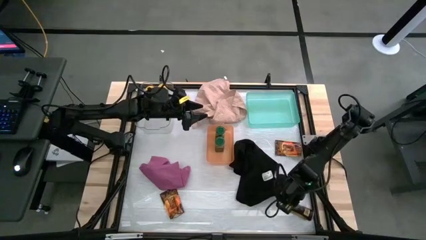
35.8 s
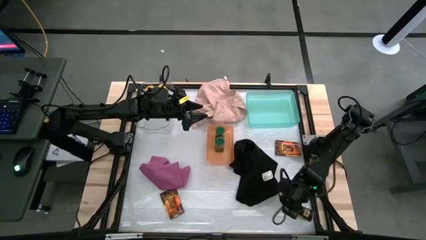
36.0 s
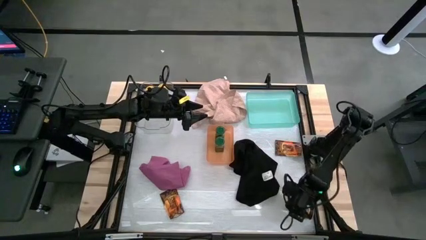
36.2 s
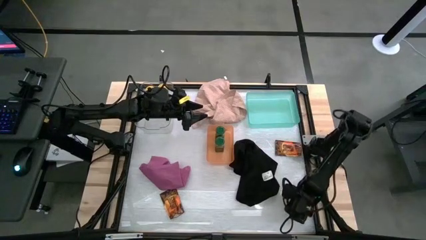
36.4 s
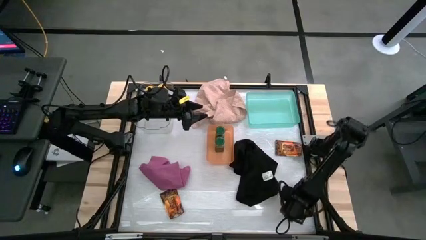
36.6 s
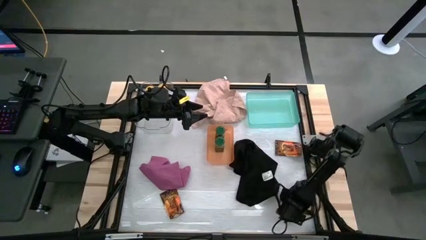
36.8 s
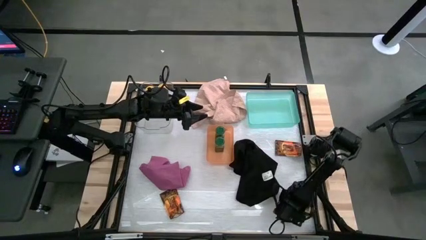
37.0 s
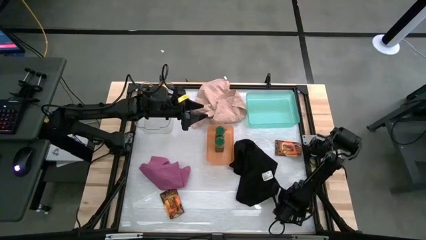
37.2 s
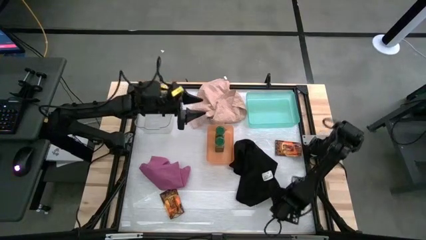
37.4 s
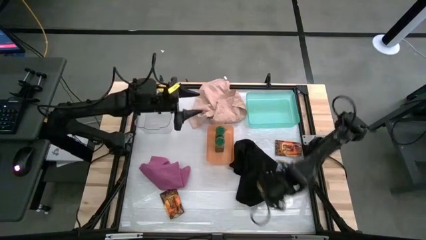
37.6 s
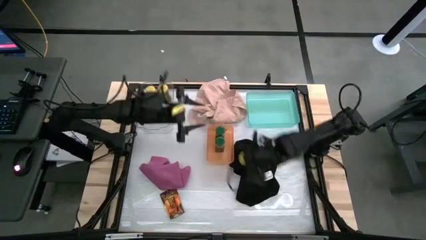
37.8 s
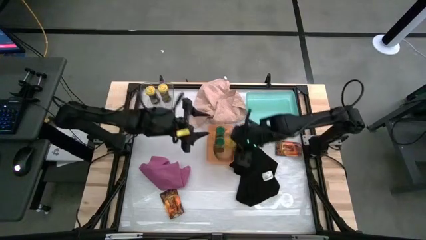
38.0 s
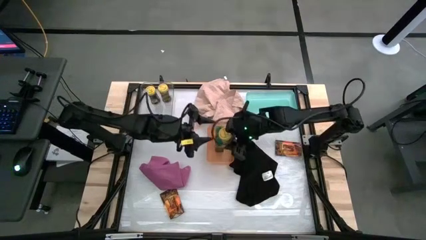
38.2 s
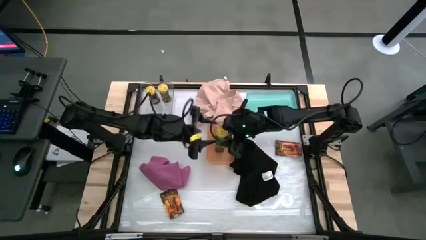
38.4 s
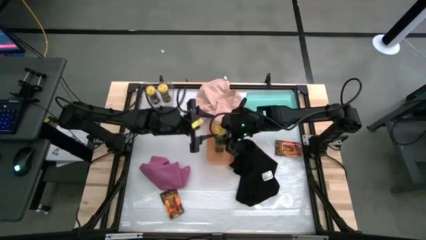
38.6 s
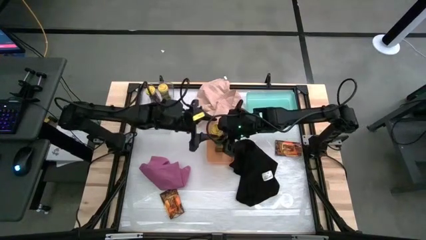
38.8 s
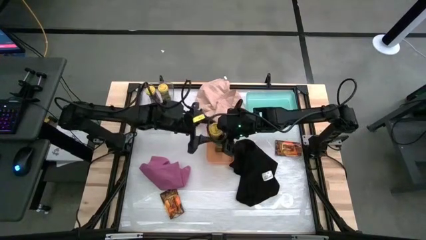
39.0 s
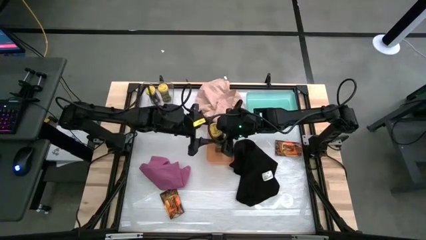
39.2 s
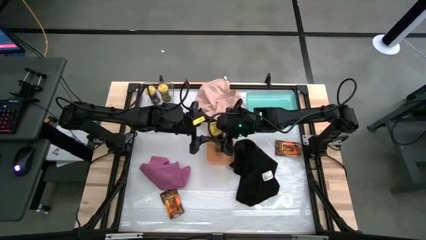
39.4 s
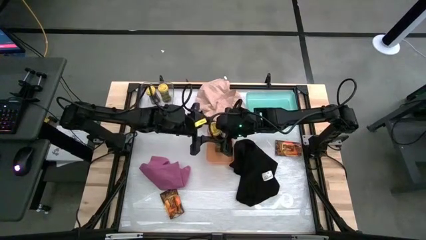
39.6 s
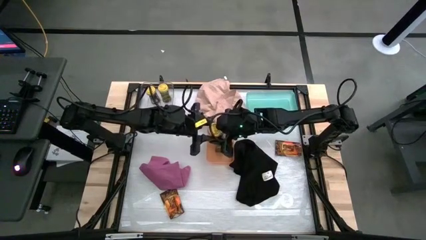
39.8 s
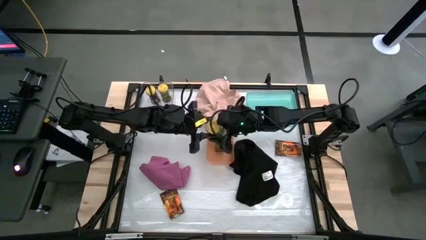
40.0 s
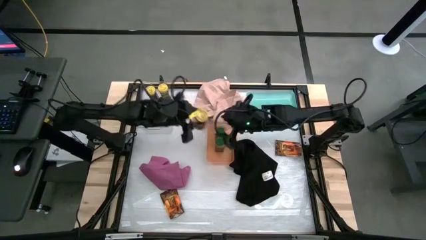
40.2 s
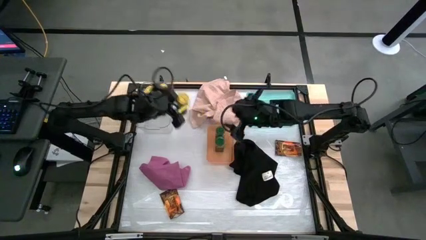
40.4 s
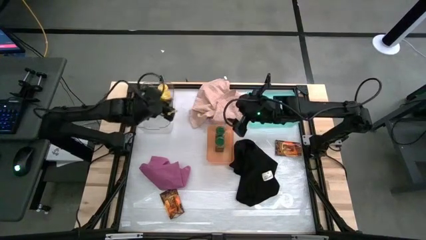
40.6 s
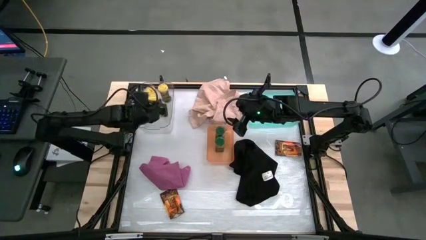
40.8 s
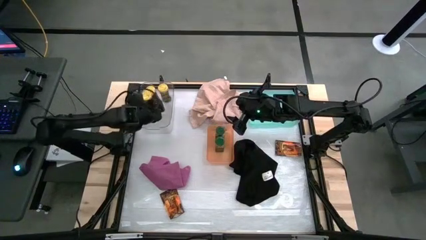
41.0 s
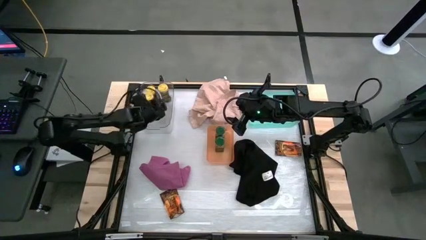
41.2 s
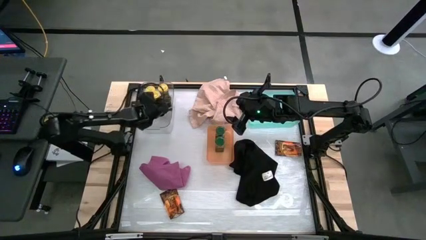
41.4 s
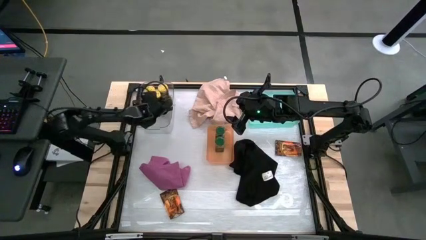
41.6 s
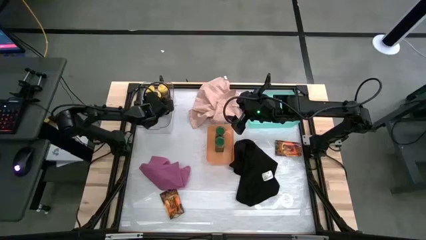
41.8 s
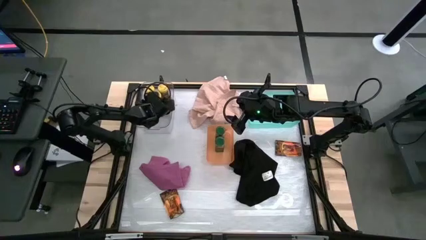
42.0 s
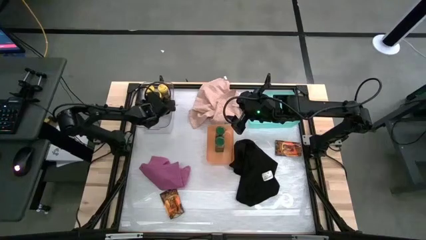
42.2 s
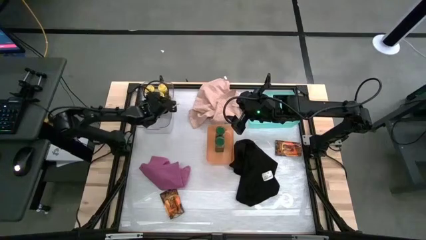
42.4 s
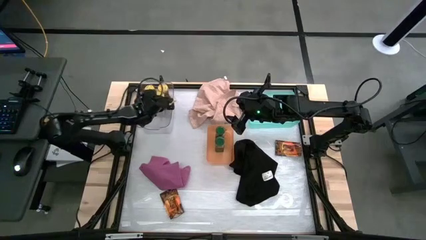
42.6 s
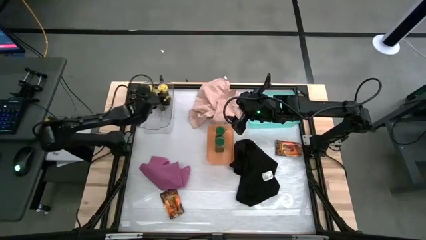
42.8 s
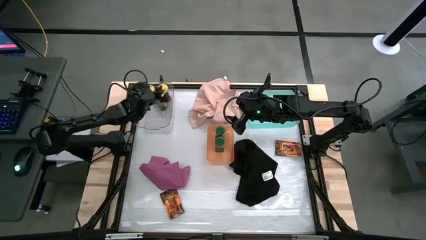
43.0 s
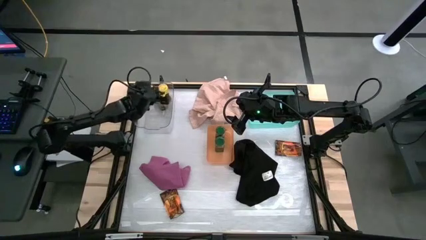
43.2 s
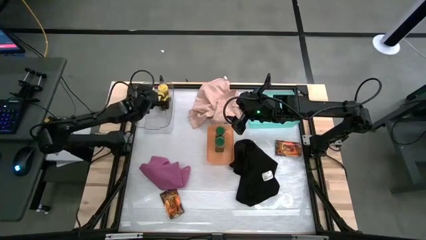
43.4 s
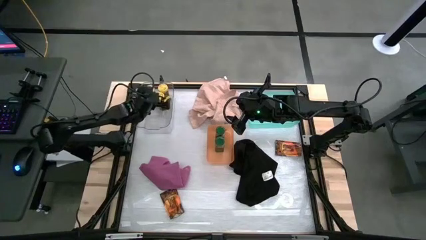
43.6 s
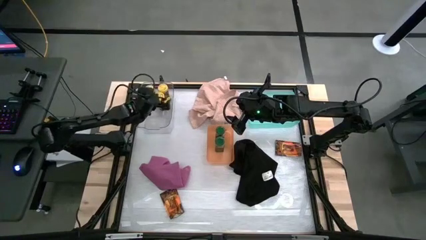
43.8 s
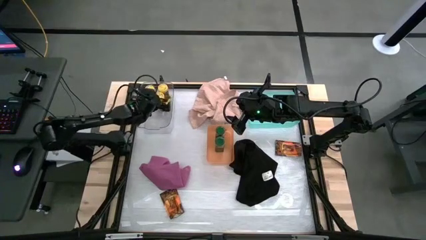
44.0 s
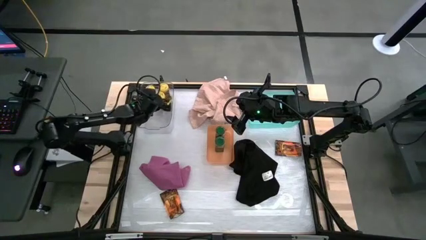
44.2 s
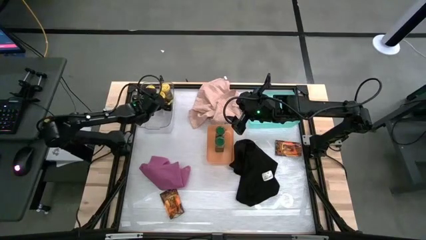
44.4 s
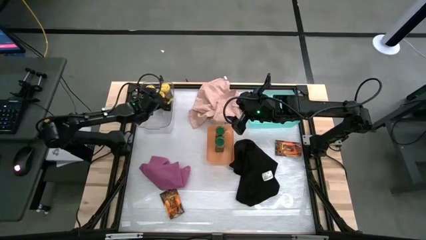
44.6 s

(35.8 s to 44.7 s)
Task: Sort spices by type
Put the yellow seasoning bottle into the transparent bin

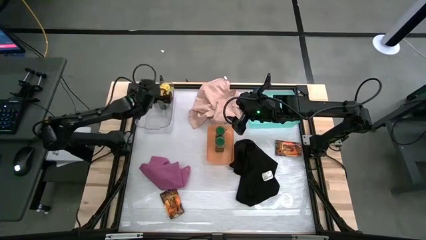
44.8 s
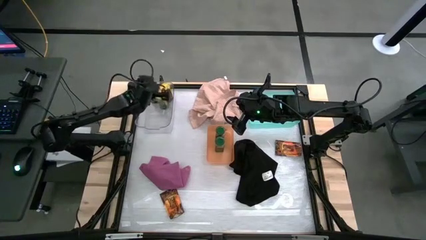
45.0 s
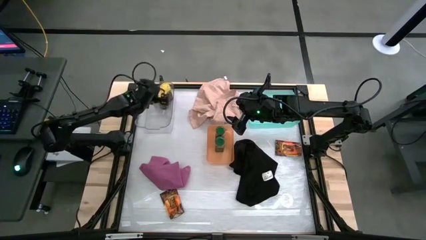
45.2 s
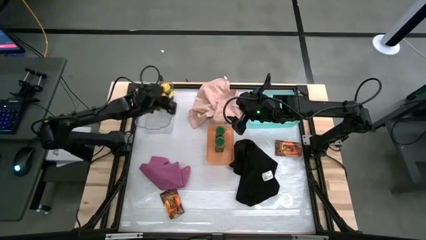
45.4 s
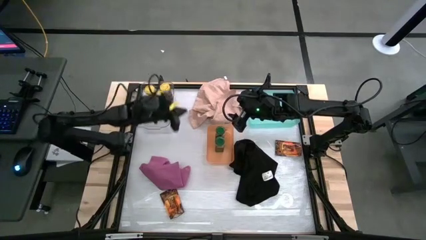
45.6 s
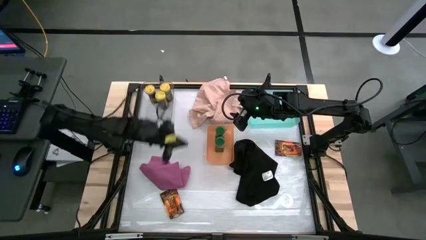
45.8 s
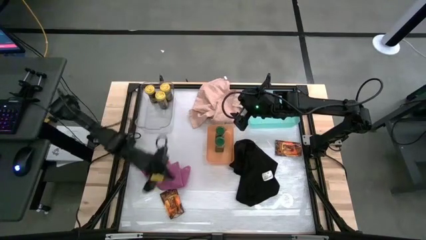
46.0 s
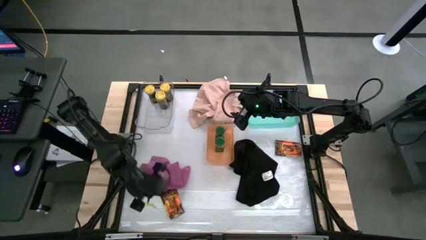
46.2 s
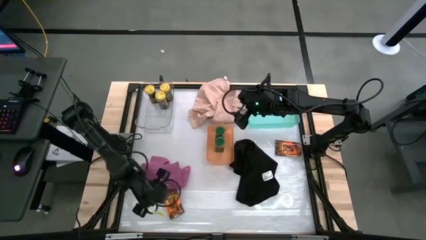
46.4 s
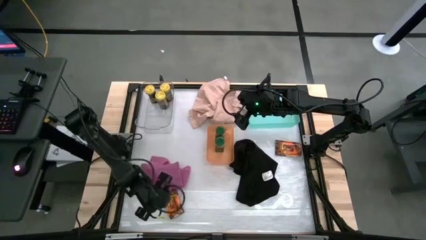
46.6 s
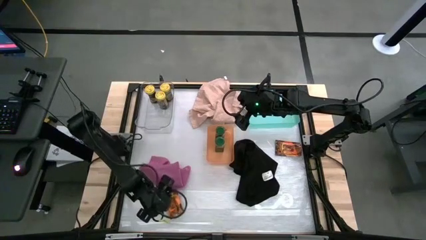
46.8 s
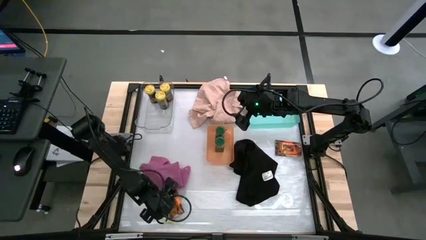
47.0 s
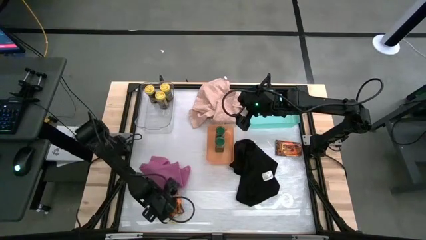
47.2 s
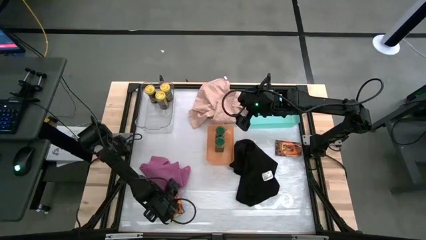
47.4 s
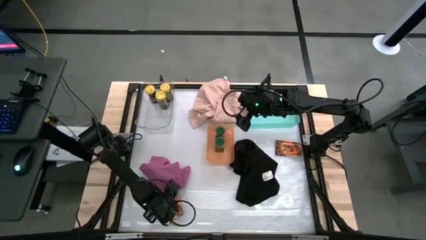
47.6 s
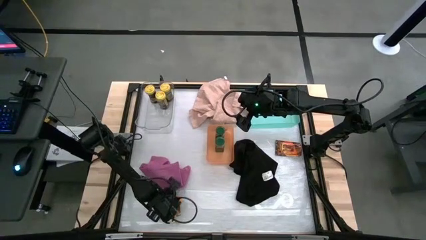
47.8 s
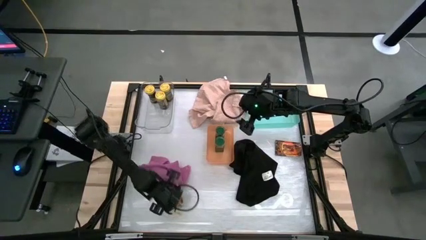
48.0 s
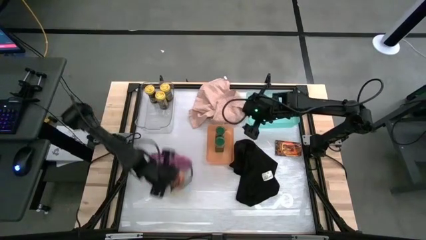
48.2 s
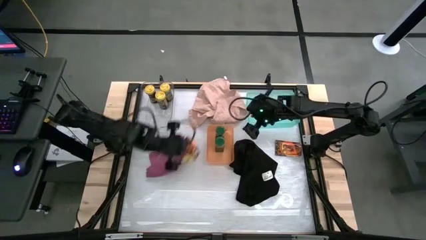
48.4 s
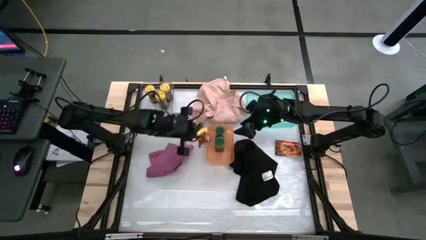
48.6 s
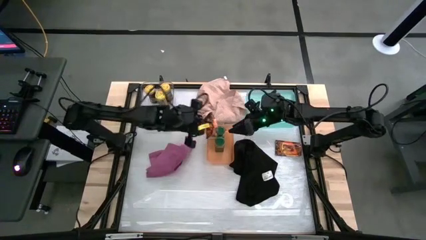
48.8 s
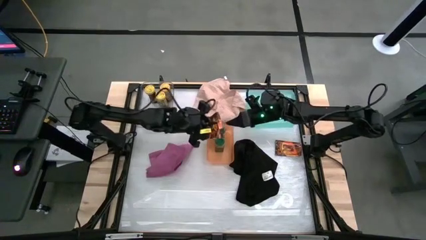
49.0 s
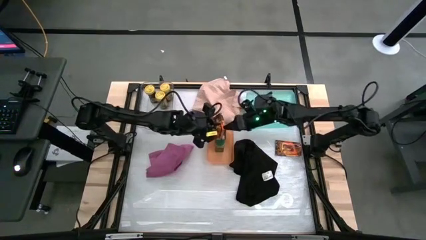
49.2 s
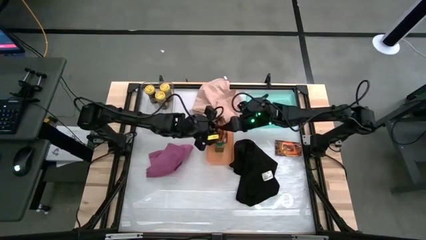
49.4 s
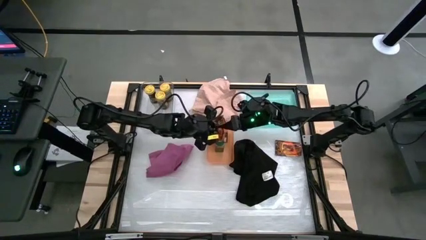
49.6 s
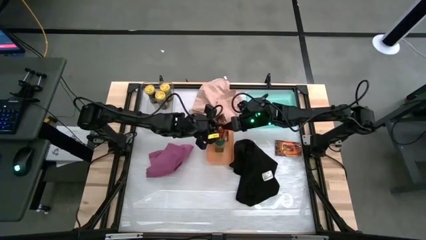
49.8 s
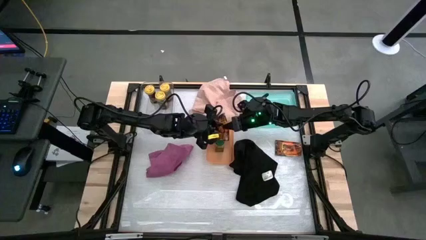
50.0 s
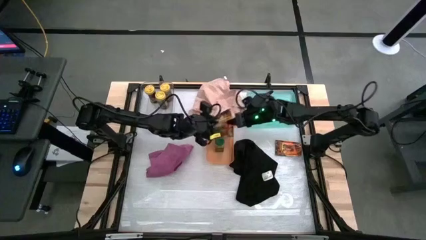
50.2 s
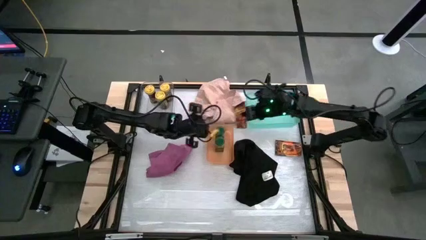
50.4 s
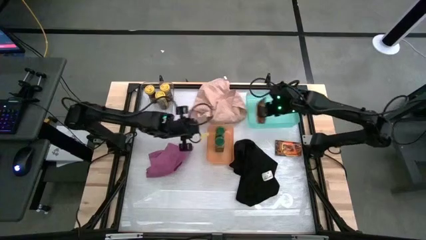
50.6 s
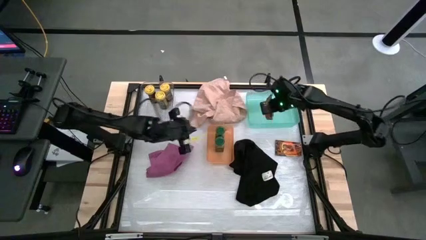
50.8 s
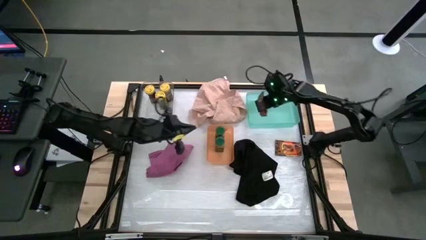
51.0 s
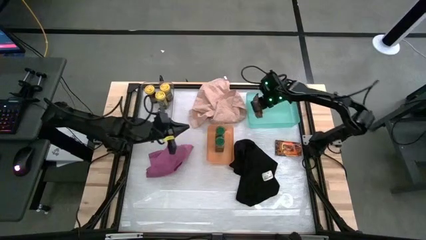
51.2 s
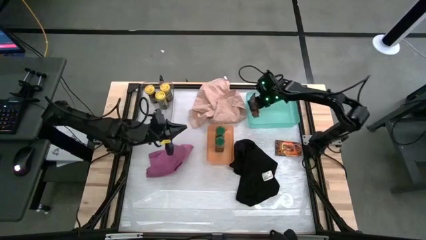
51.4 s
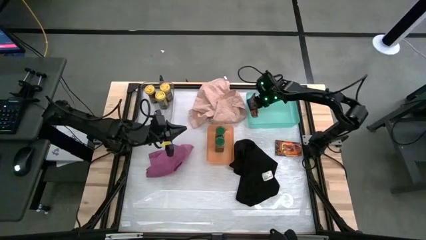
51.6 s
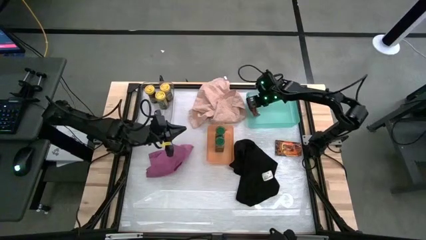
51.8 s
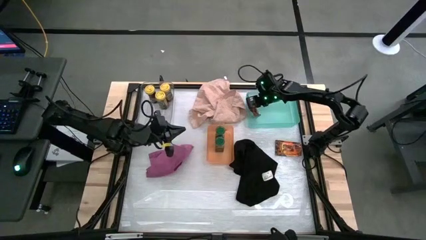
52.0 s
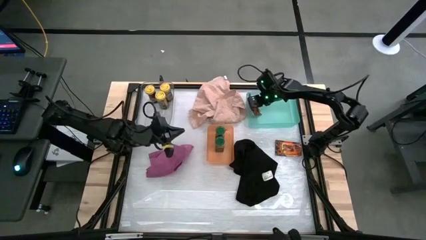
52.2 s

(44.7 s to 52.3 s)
Put the left orange seasoning bag into the blue bin

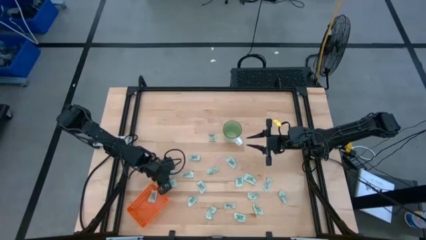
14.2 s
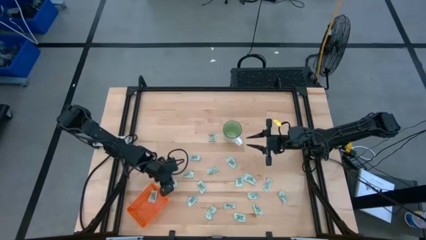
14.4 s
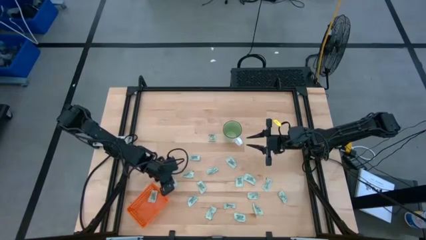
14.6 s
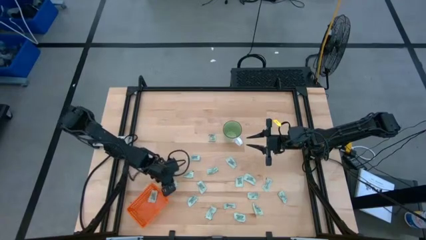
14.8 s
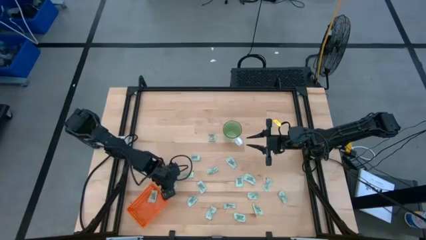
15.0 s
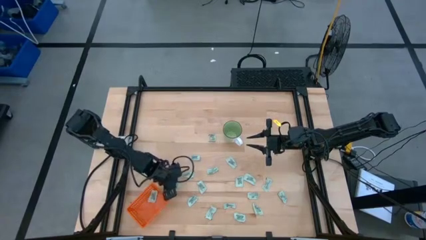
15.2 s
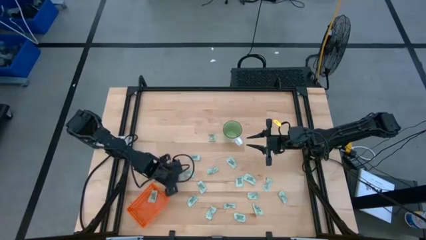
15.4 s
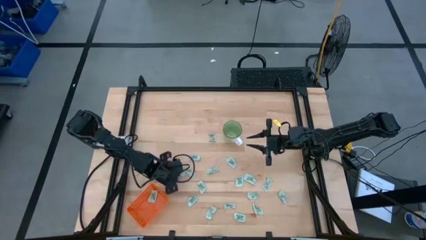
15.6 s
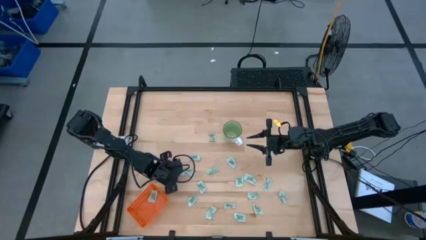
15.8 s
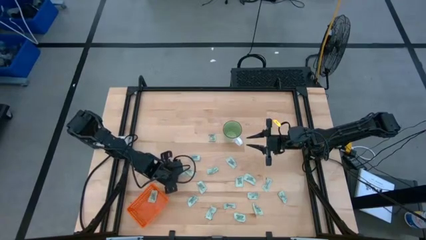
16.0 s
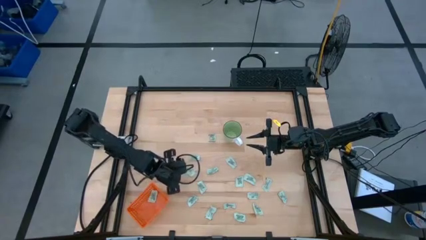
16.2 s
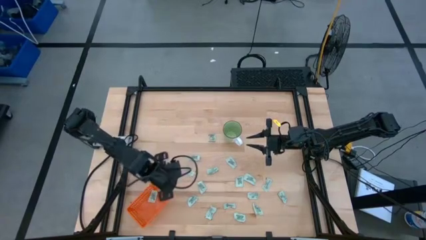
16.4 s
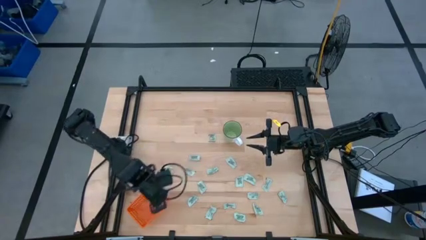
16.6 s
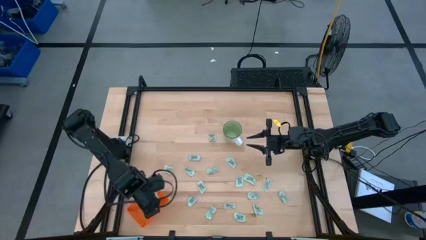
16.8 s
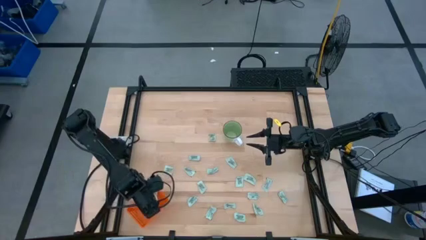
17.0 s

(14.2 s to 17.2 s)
Task: Pick and place Stevia / Truvia into bins
Put the light green stevia packet into the orange basket
